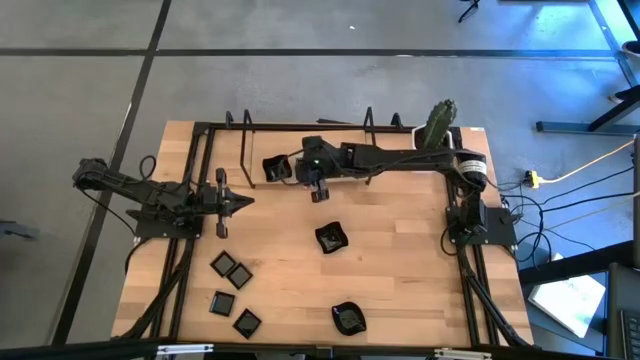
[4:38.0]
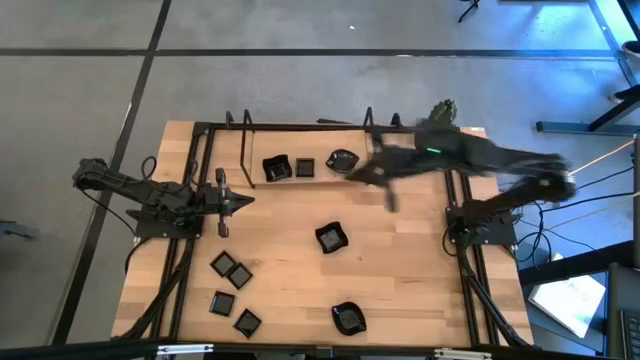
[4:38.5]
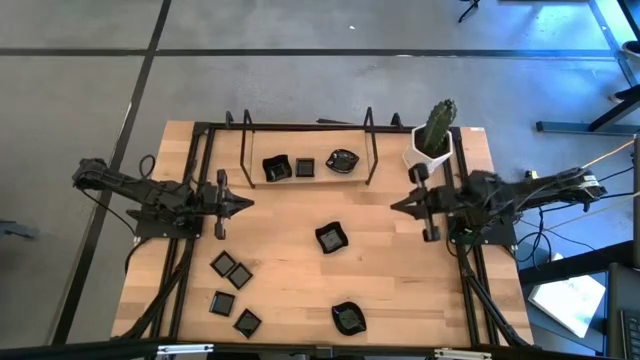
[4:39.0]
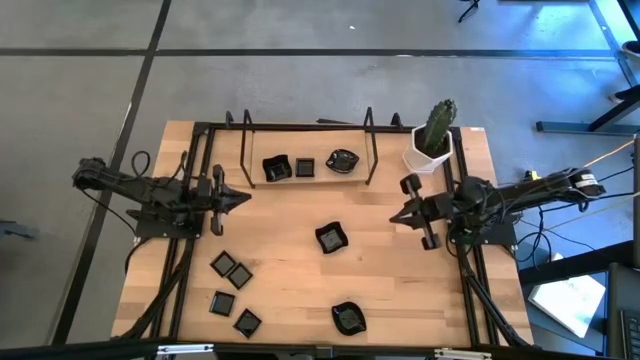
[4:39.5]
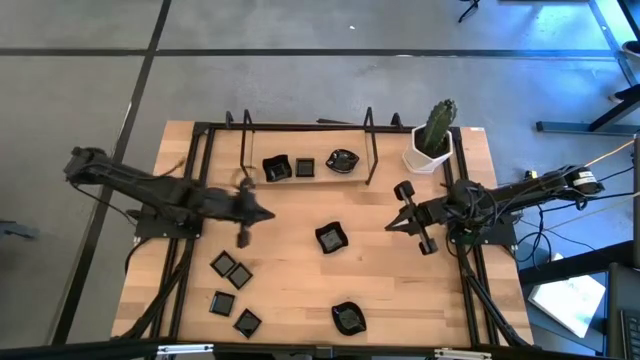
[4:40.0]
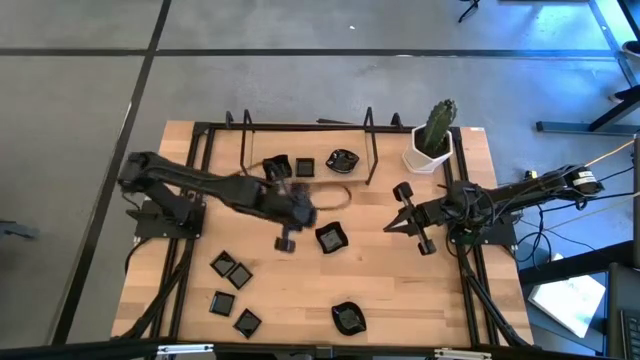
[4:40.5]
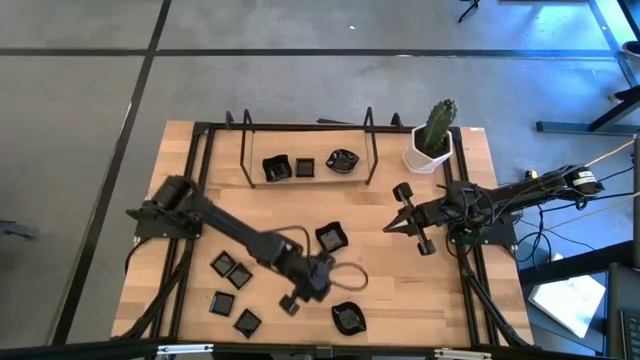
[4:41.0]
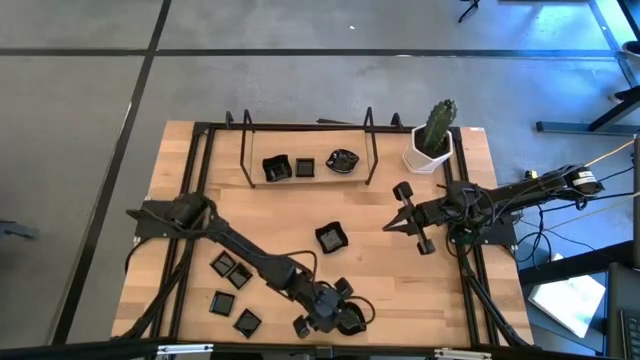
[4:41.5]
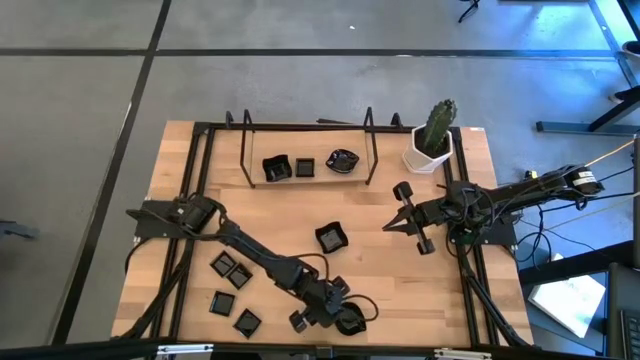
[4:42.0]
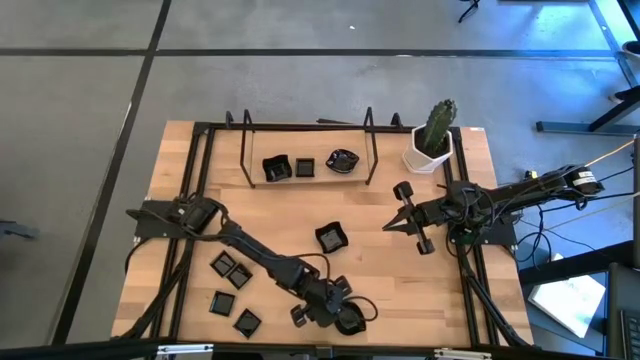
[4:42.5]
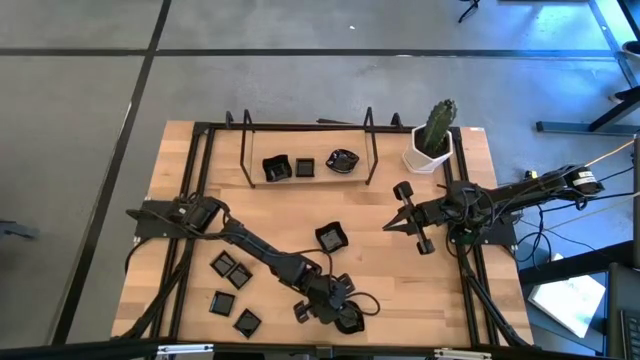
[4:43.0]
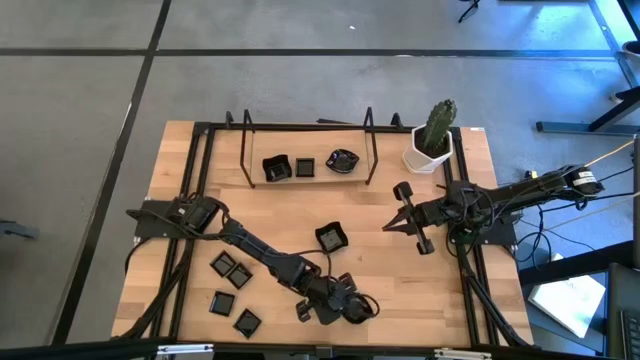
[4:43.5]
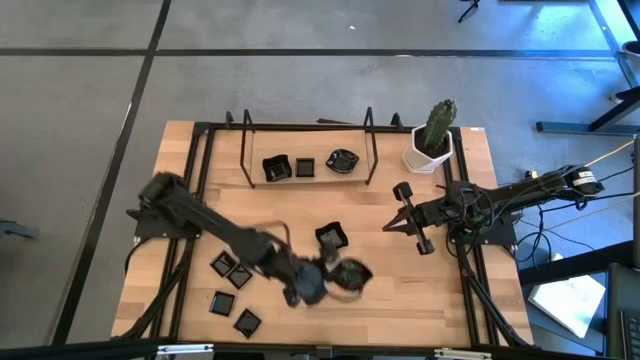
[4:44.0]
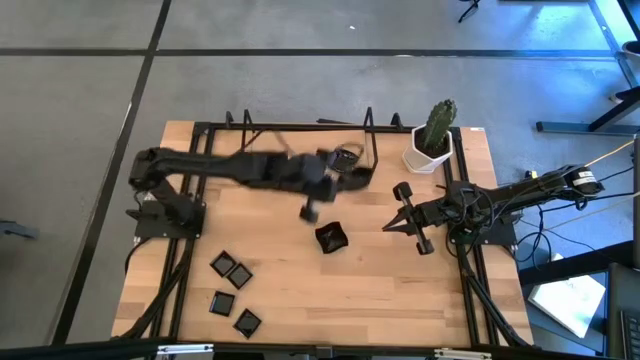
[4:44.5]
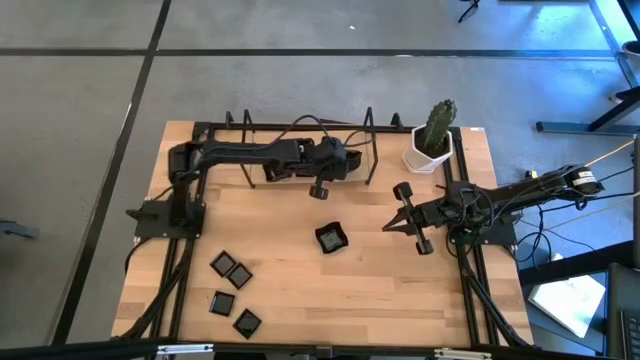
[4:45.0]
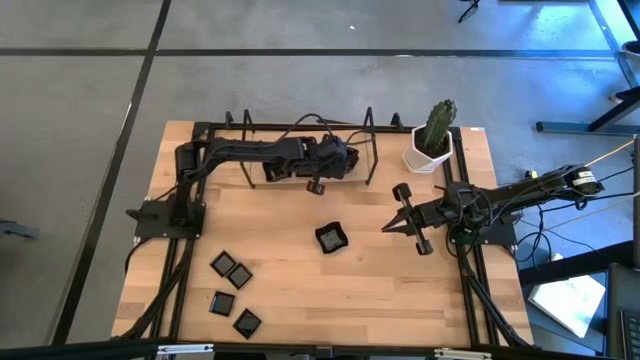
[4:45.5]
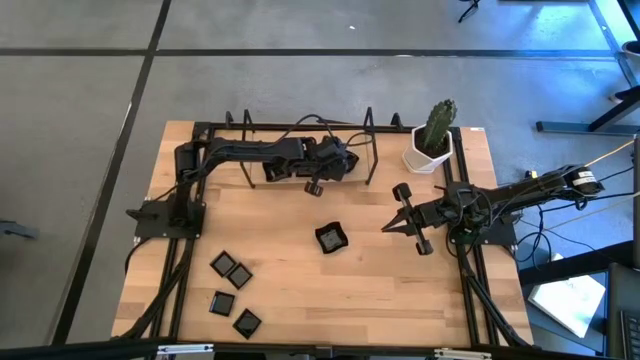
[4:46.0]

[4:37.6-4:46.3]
Task: Pick & Place Mini shaped plates
Stack the leaf-shaped plate on top of the leaf-shaped plate on the shelf

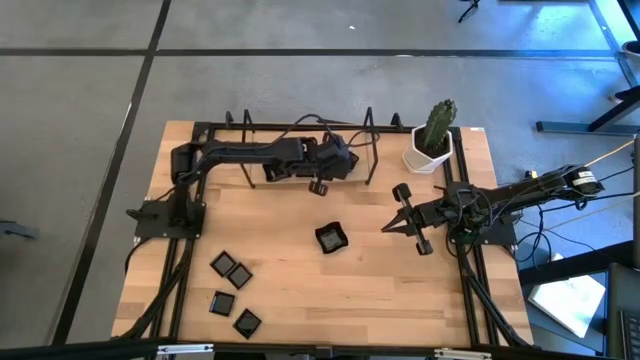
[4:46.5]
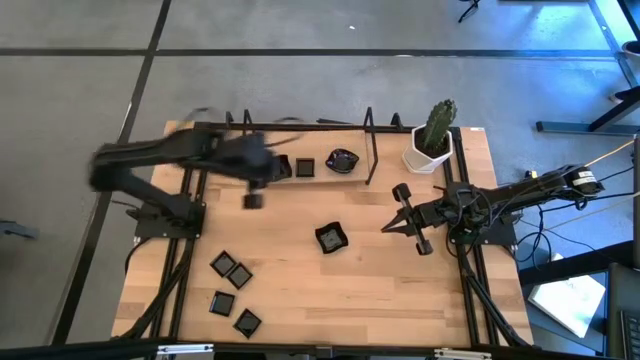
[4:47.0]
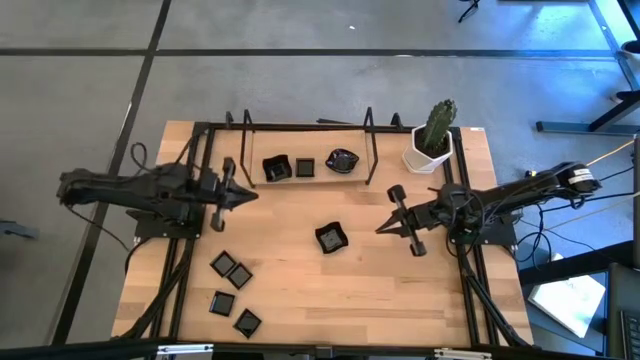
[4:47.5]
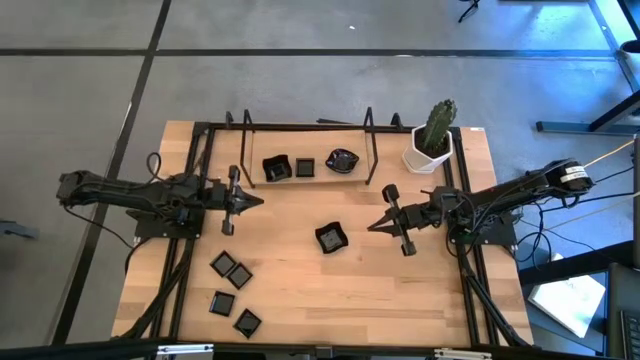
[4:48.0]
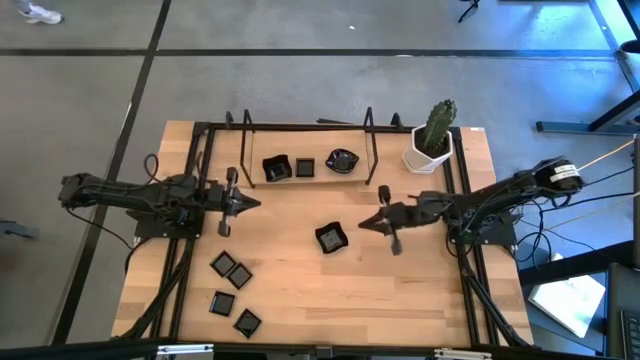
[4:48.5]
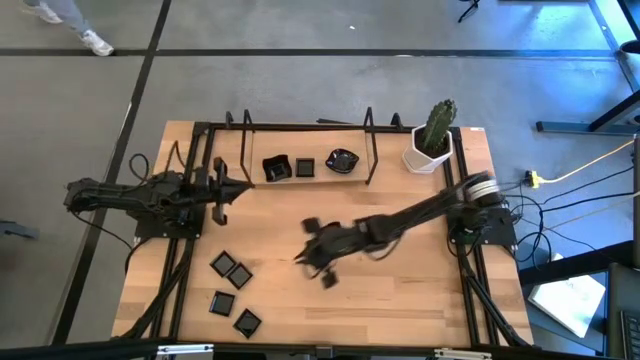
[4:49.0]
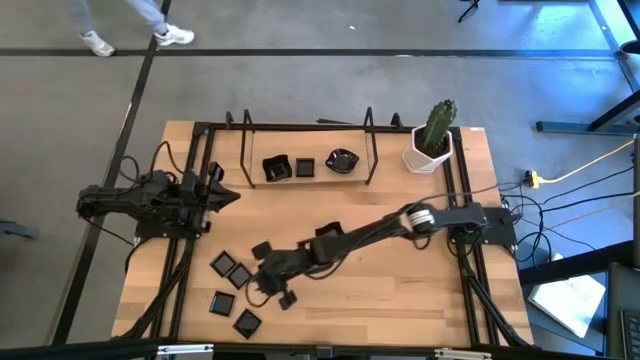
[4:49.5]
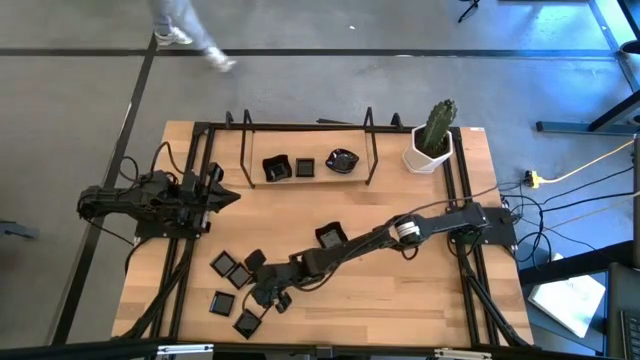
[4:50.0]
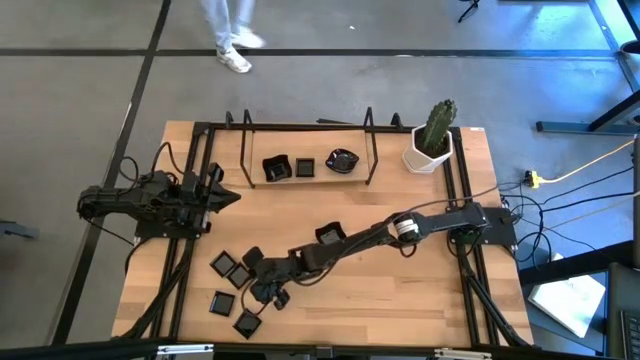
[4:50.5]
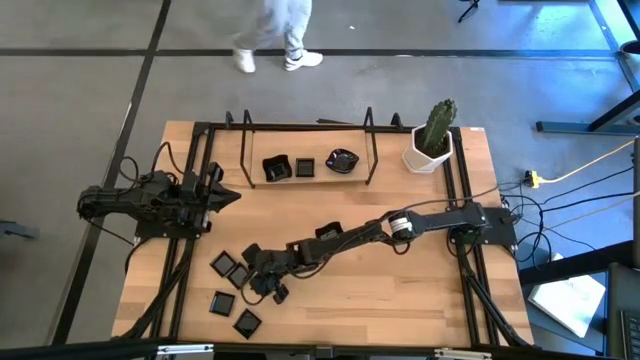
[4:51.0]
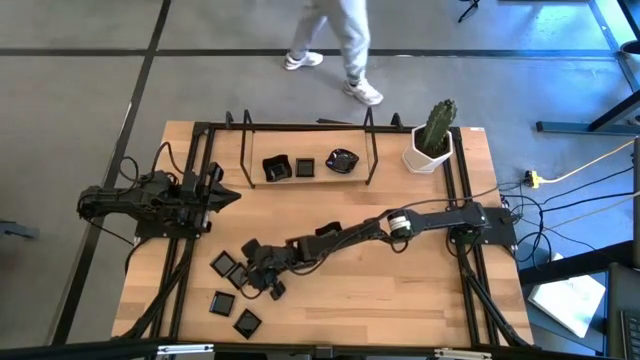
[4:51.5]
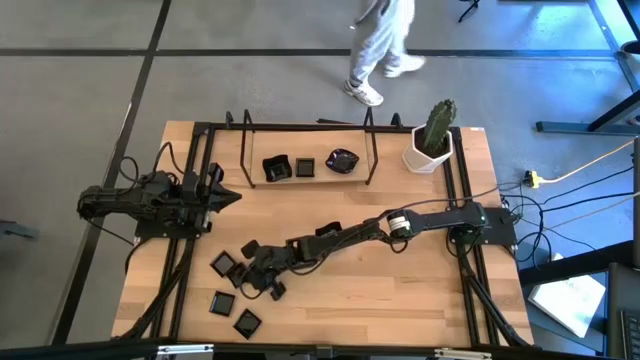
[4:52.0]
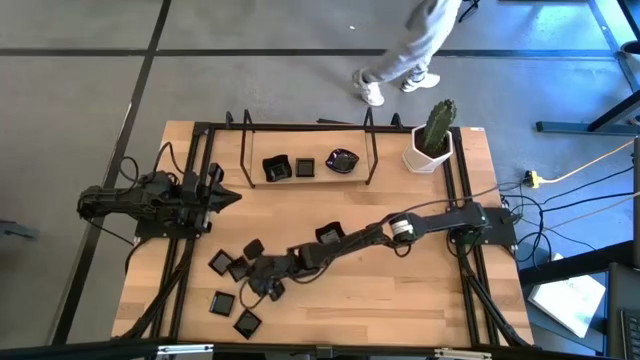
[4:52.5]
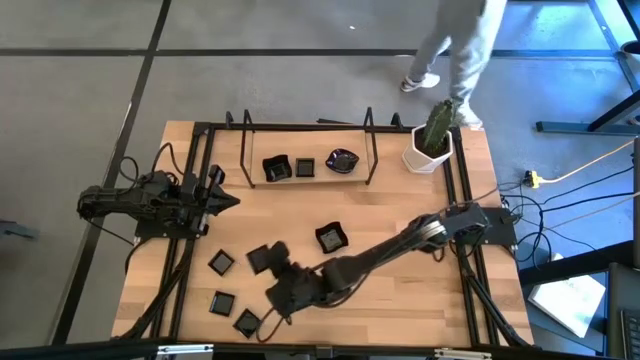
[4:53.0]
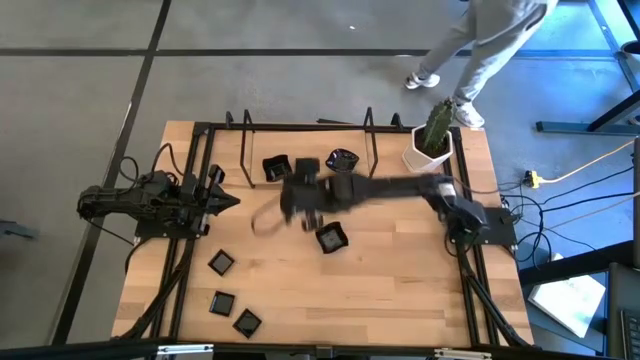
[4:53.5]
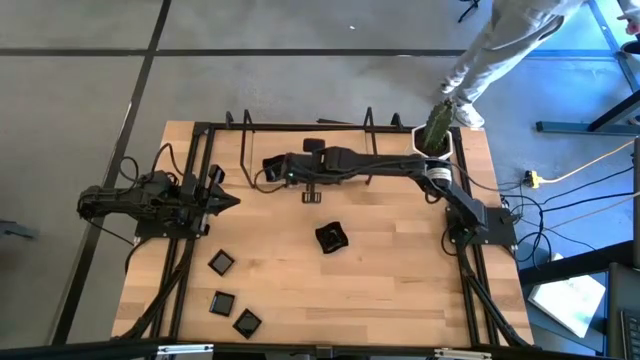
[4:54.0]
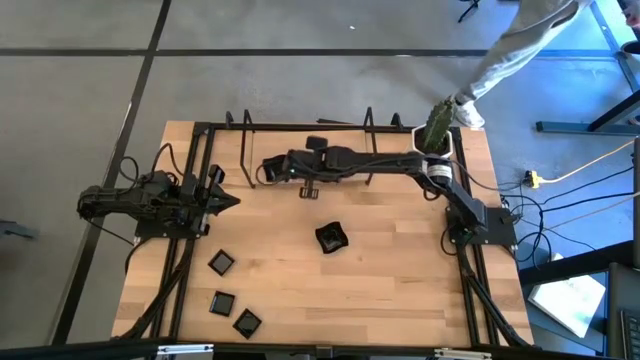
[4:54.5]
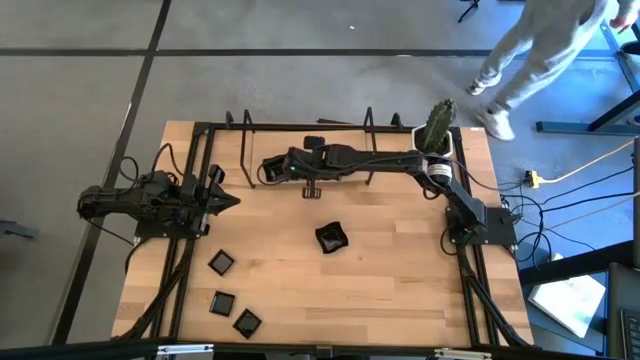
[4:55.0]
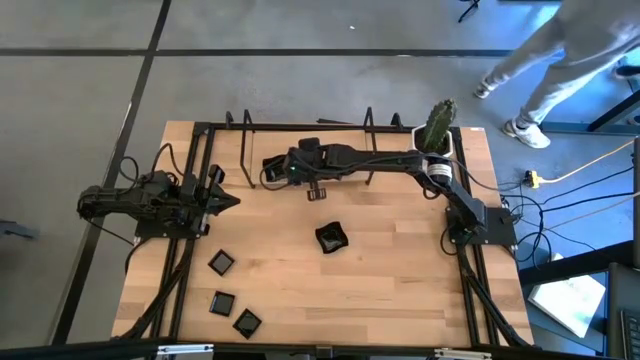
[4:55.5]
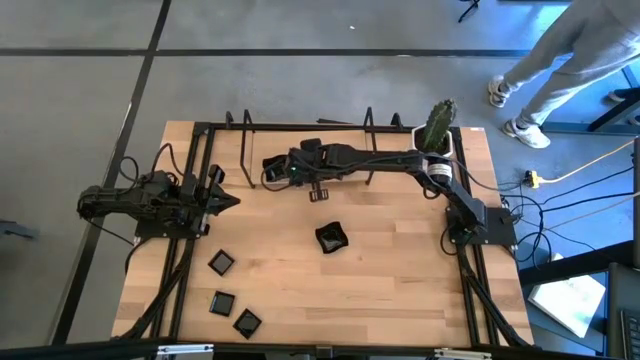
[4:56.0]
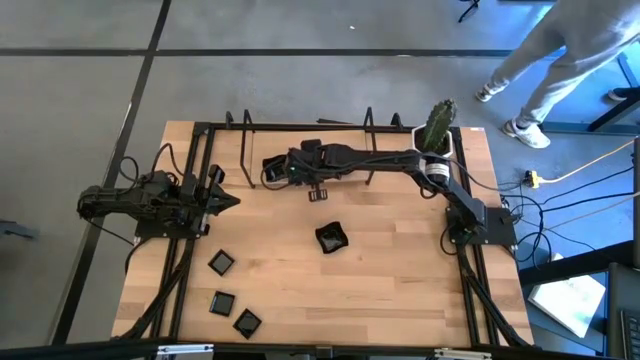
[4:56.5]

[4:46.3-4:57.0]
Stack the square plate on top of the square plate on the shelf

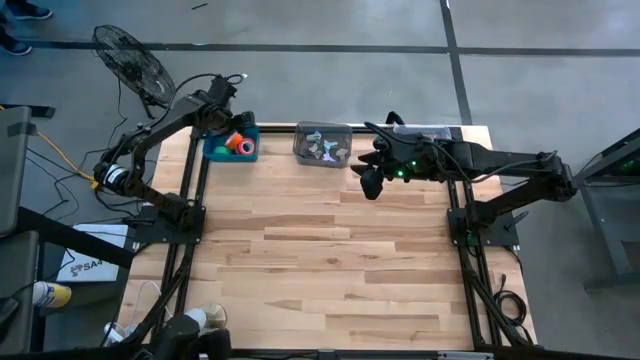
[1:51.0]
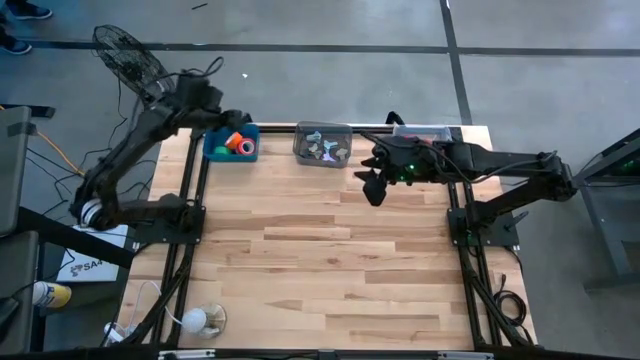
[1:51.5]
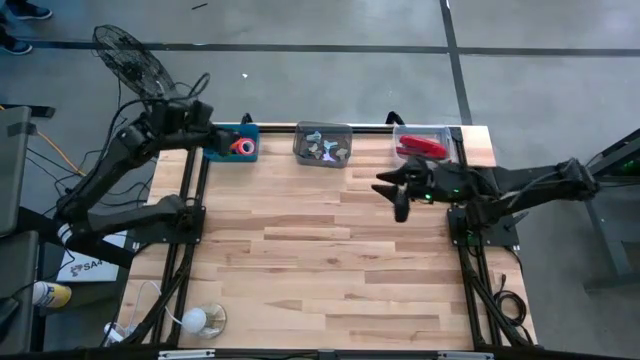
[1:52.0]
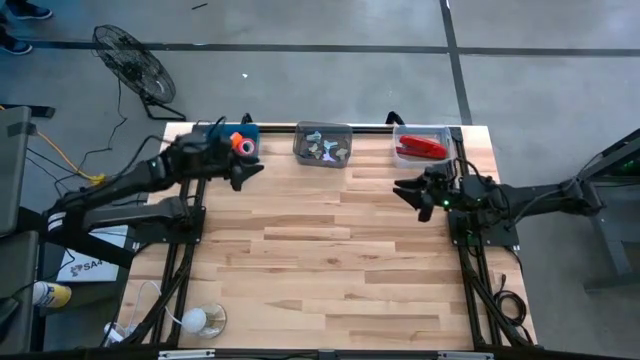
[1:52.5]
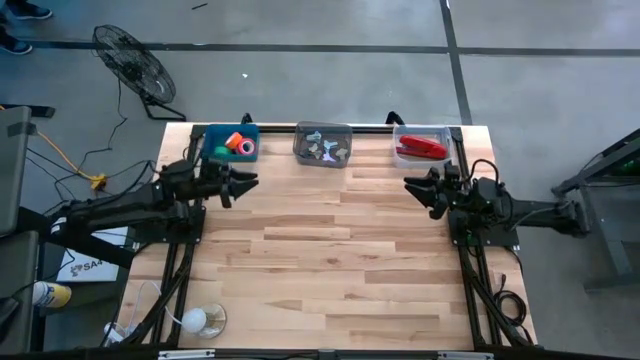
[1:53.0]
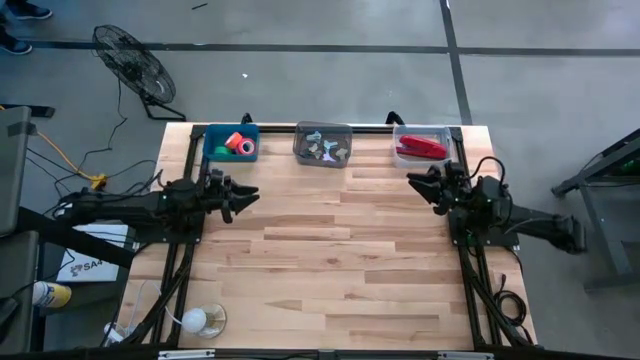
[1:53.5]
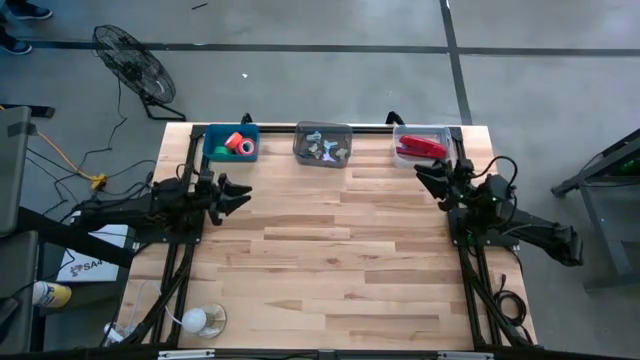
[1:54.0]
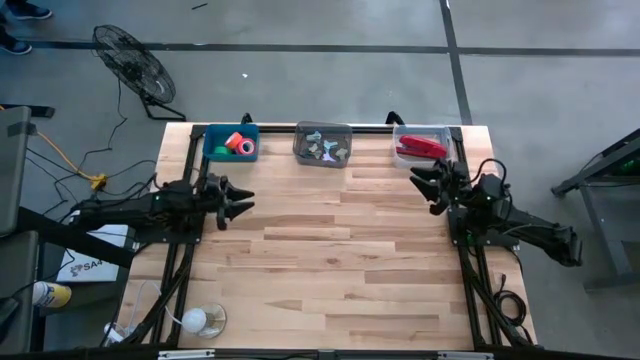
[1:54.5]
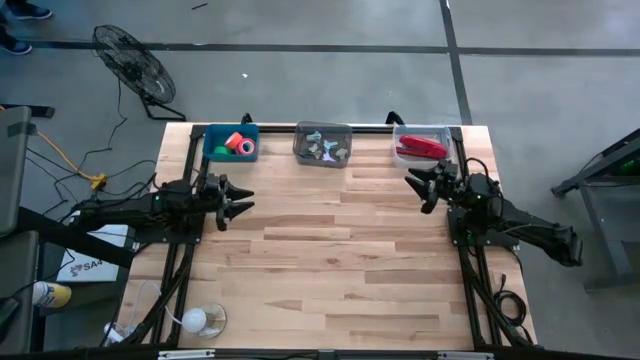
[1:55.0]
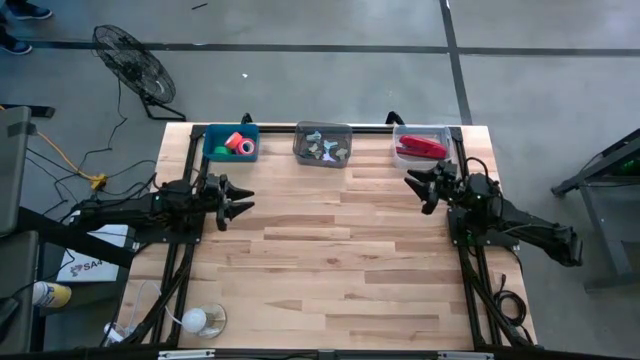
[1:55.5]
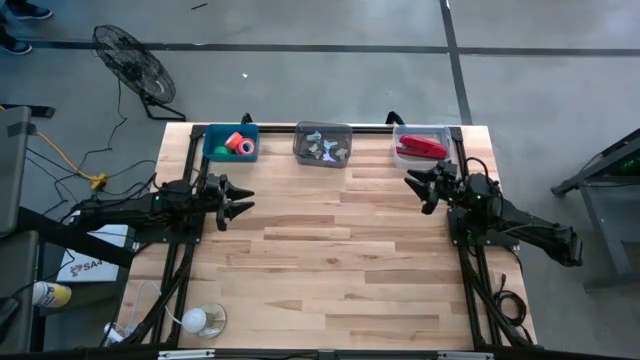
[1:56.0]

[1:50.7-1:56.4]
Task: Pick and place Stapler, Stapler remover, tape
Return to Home Position
